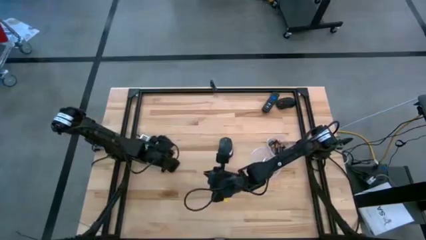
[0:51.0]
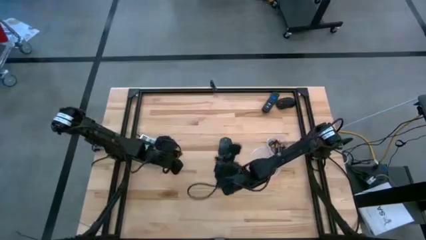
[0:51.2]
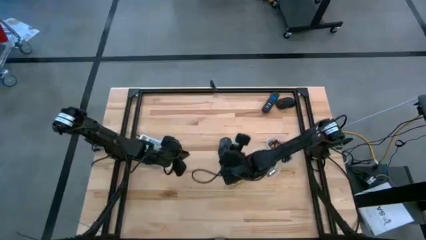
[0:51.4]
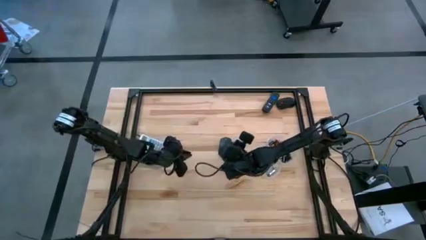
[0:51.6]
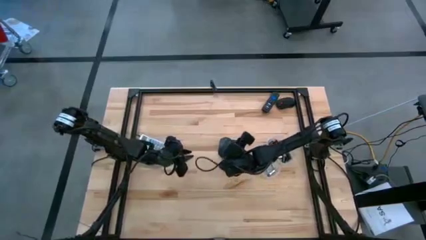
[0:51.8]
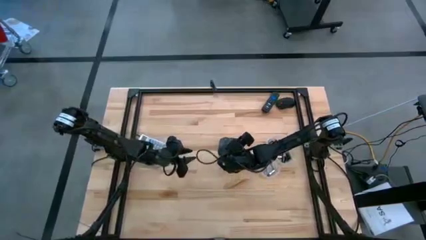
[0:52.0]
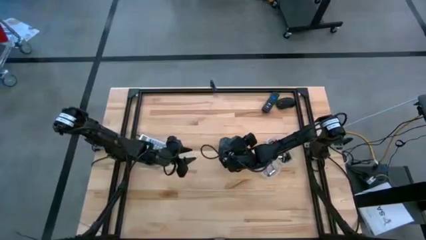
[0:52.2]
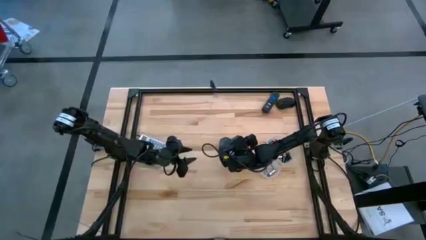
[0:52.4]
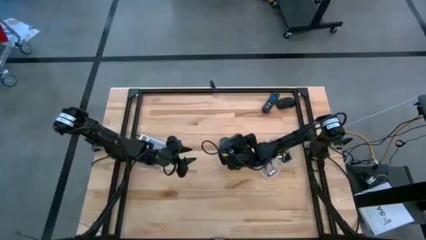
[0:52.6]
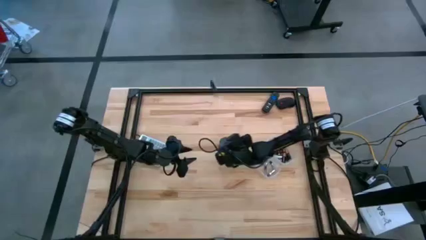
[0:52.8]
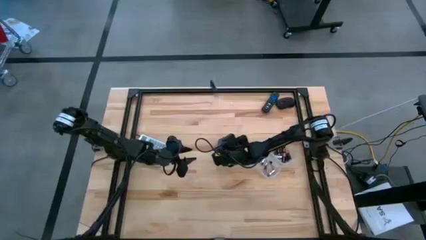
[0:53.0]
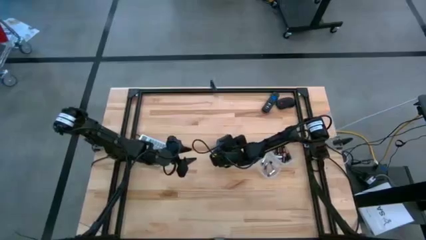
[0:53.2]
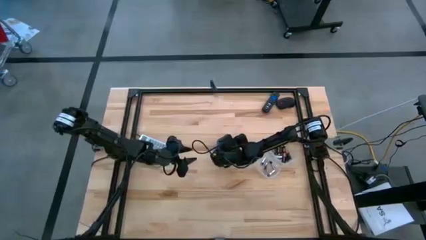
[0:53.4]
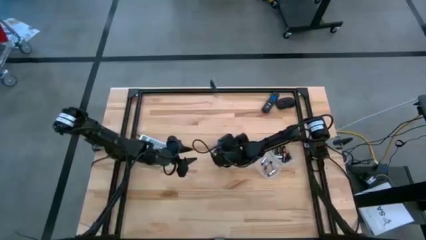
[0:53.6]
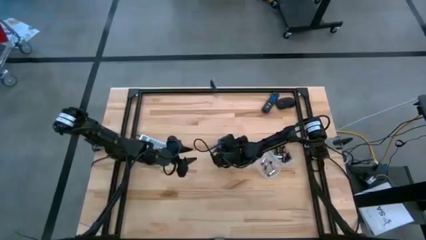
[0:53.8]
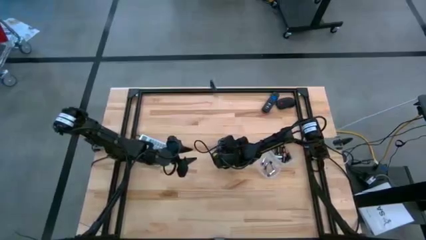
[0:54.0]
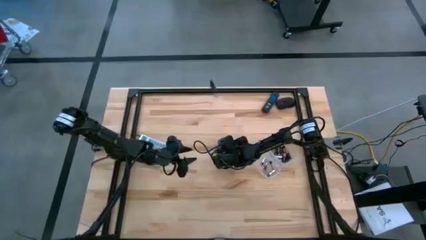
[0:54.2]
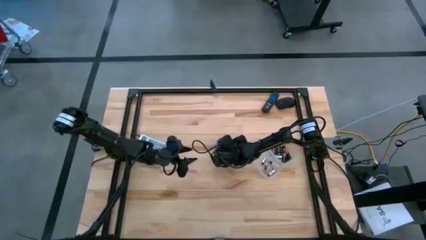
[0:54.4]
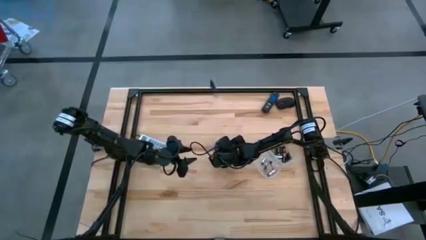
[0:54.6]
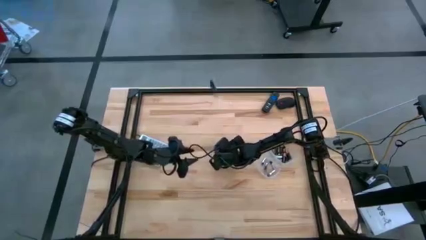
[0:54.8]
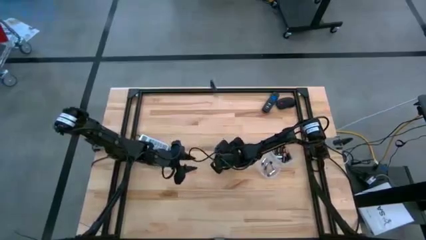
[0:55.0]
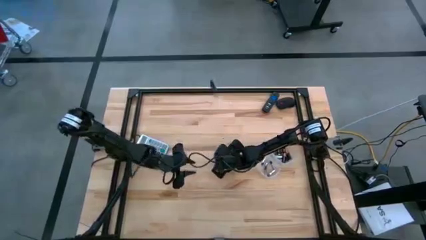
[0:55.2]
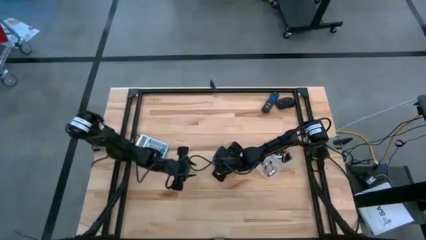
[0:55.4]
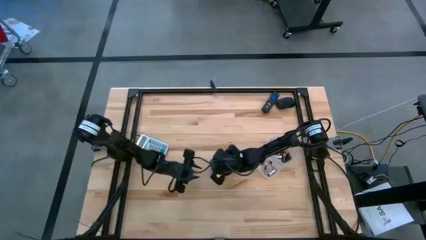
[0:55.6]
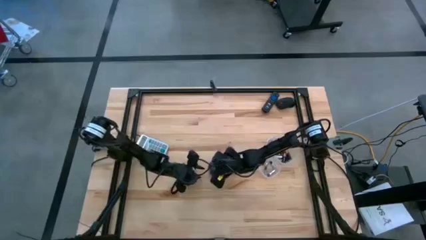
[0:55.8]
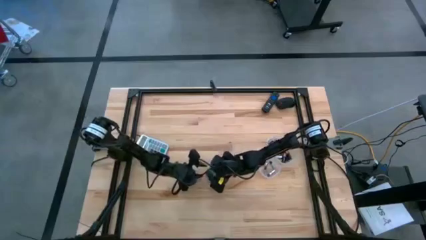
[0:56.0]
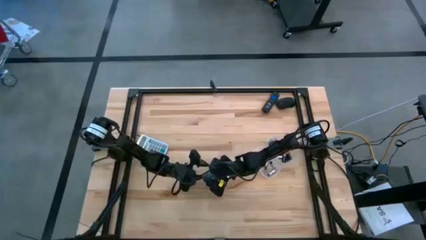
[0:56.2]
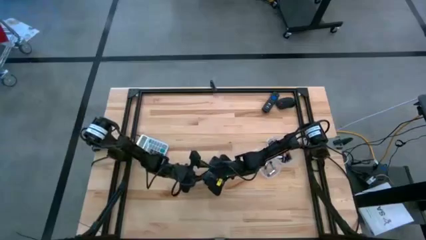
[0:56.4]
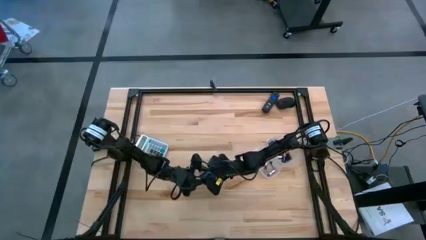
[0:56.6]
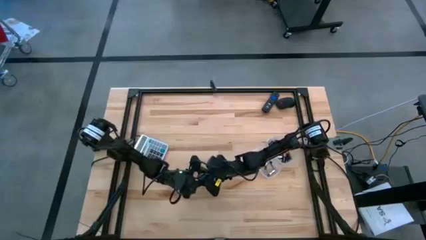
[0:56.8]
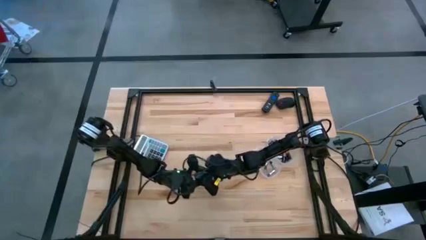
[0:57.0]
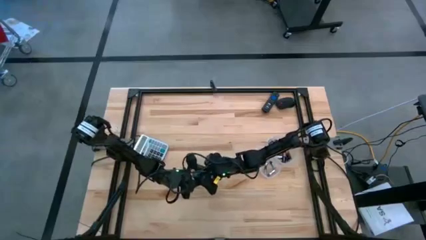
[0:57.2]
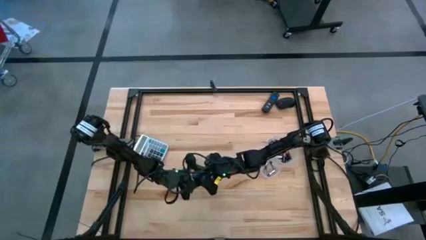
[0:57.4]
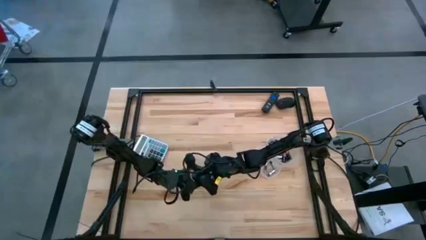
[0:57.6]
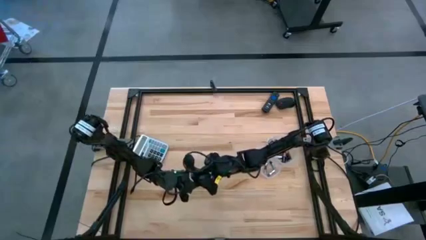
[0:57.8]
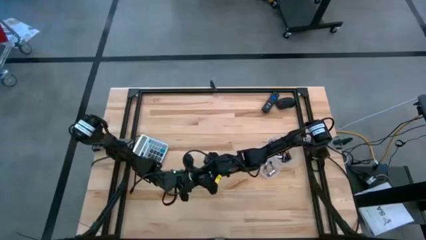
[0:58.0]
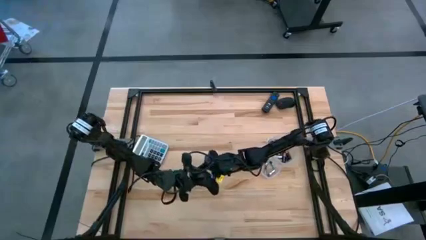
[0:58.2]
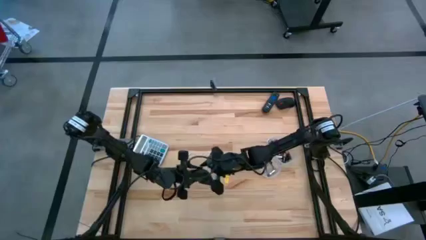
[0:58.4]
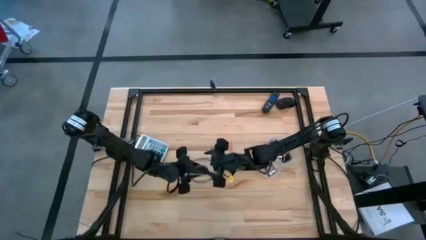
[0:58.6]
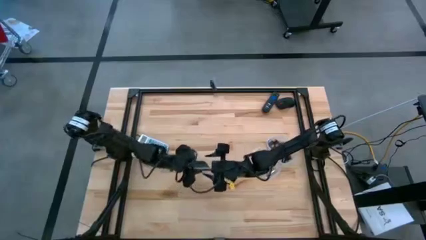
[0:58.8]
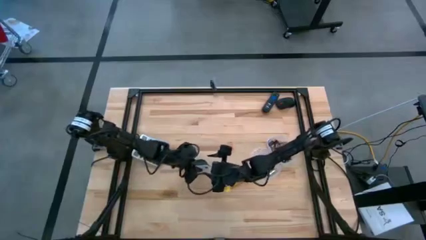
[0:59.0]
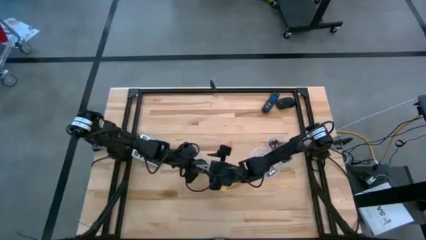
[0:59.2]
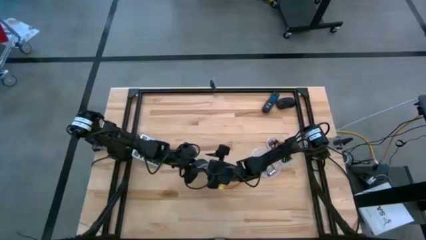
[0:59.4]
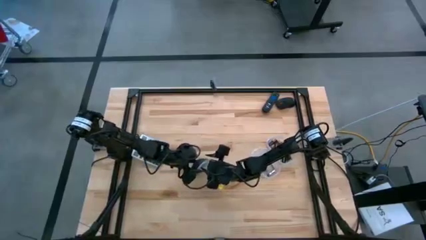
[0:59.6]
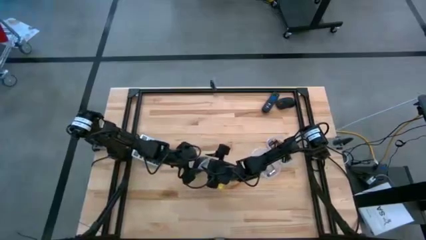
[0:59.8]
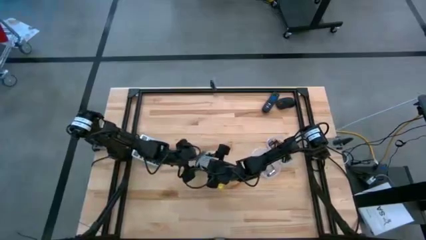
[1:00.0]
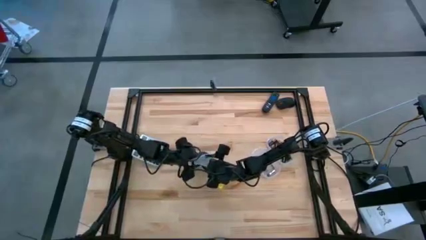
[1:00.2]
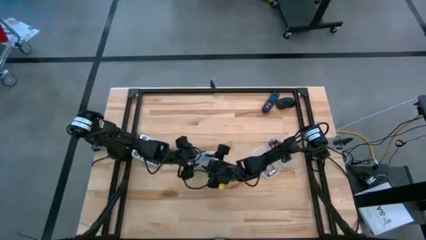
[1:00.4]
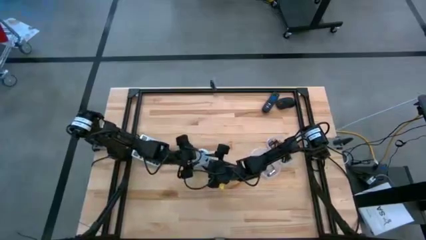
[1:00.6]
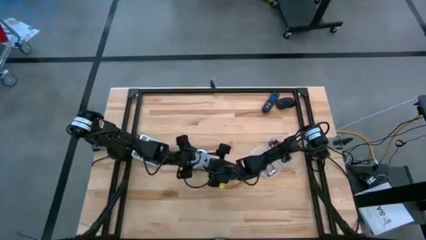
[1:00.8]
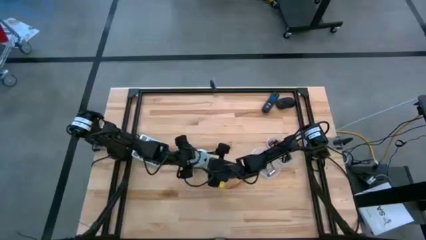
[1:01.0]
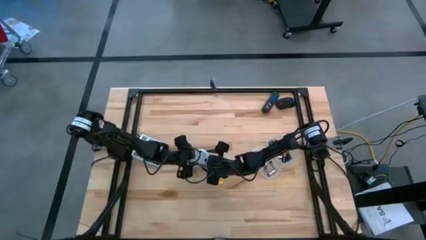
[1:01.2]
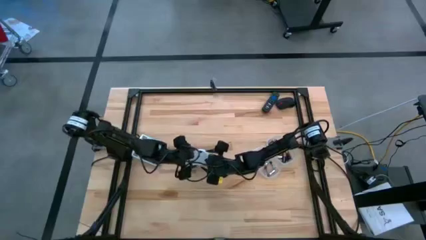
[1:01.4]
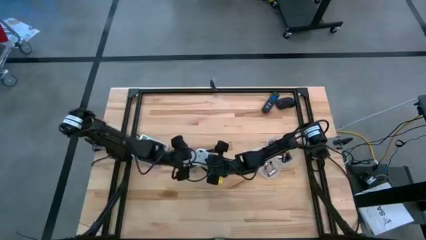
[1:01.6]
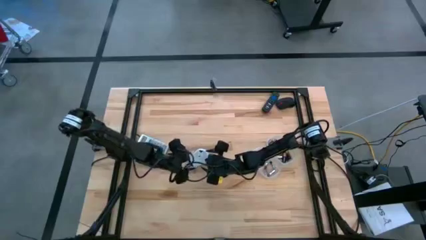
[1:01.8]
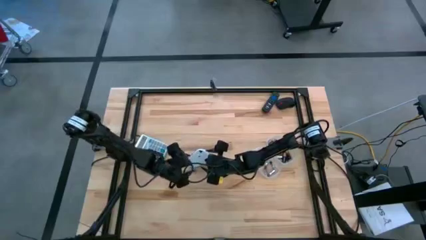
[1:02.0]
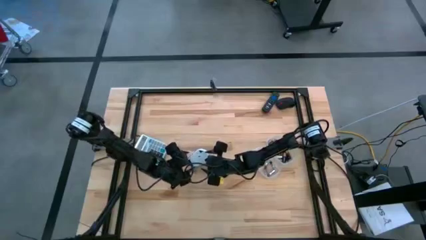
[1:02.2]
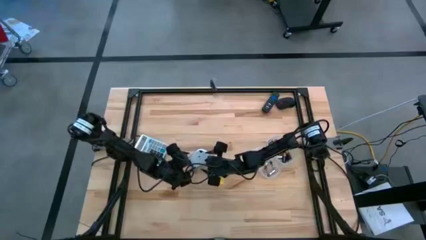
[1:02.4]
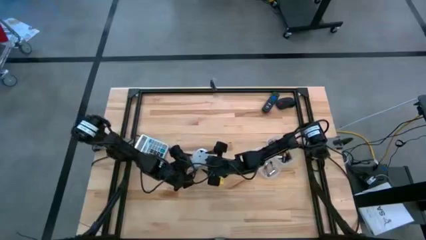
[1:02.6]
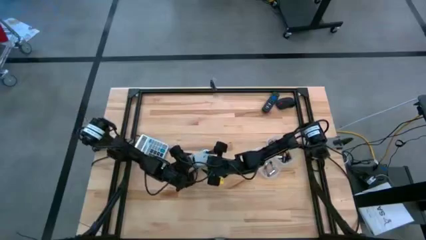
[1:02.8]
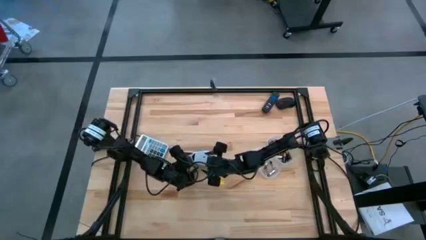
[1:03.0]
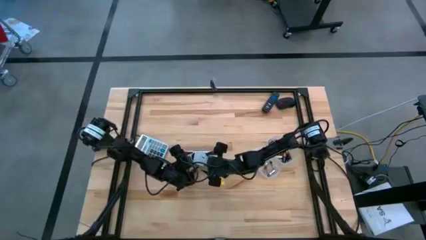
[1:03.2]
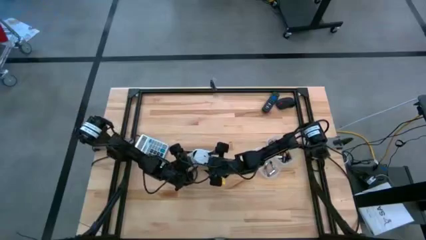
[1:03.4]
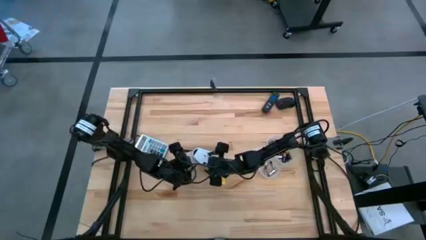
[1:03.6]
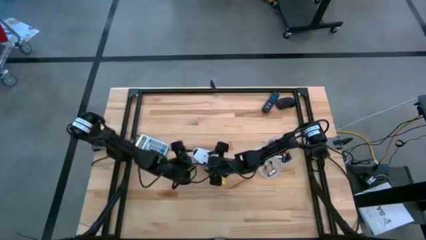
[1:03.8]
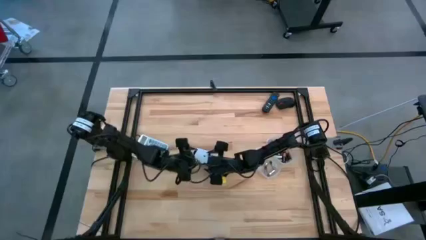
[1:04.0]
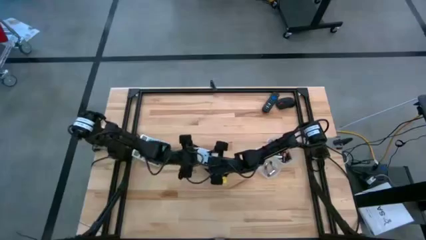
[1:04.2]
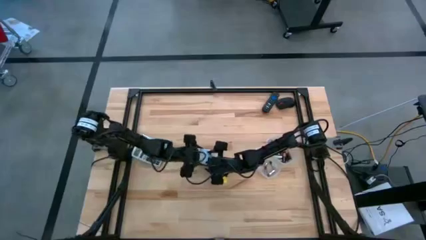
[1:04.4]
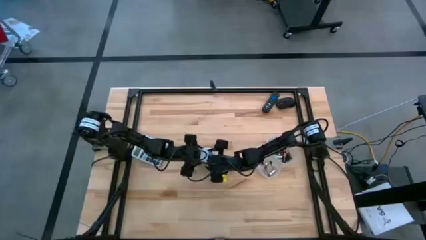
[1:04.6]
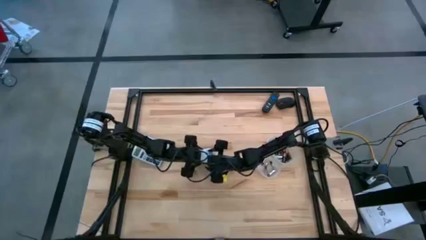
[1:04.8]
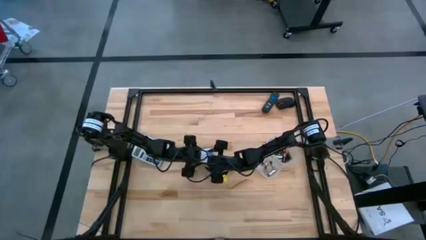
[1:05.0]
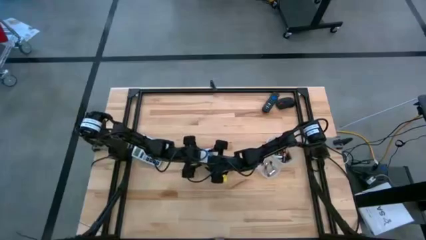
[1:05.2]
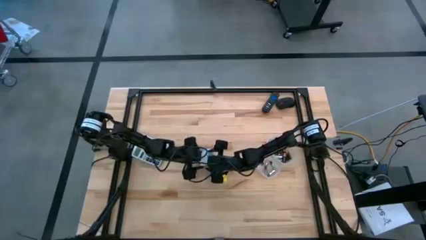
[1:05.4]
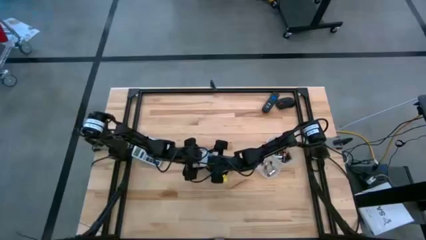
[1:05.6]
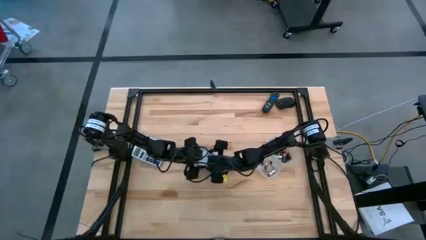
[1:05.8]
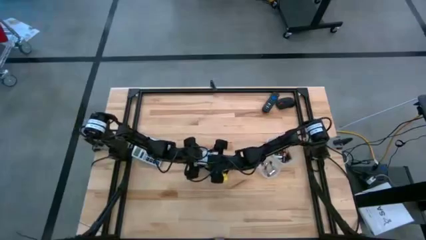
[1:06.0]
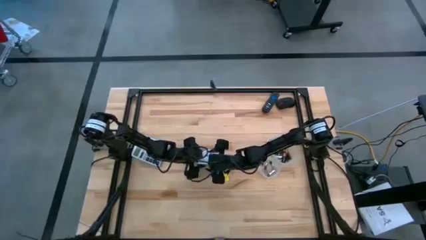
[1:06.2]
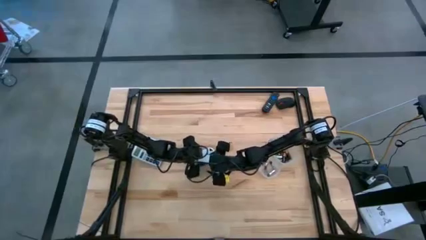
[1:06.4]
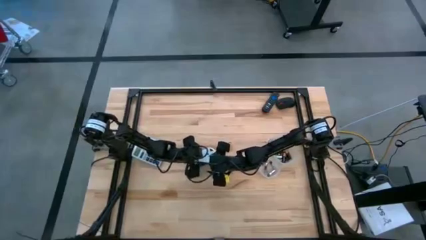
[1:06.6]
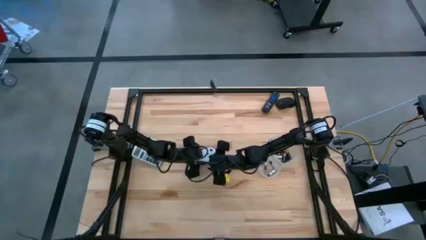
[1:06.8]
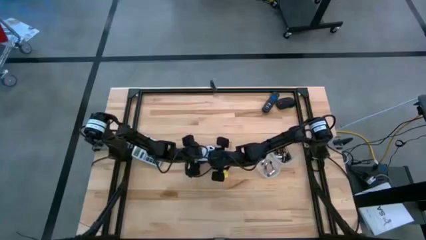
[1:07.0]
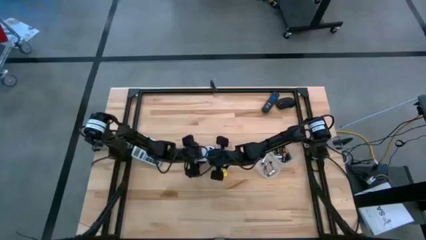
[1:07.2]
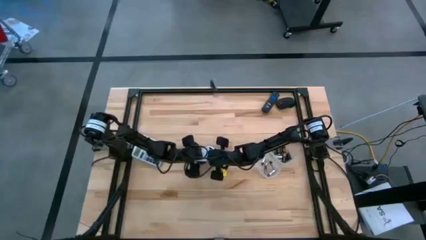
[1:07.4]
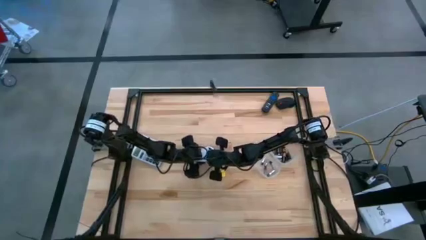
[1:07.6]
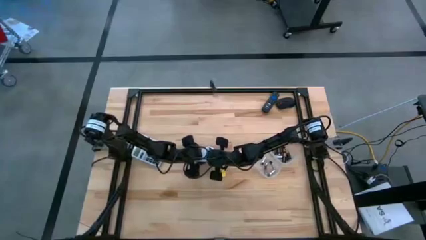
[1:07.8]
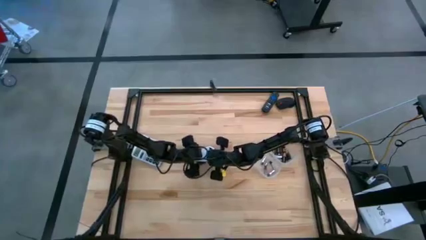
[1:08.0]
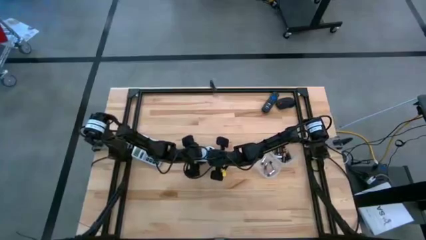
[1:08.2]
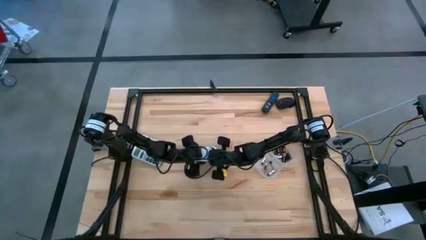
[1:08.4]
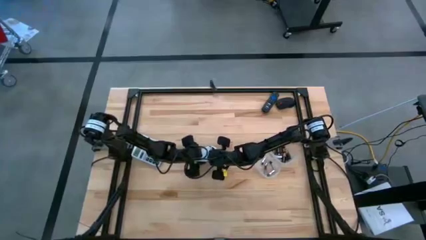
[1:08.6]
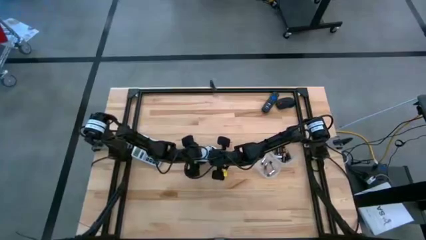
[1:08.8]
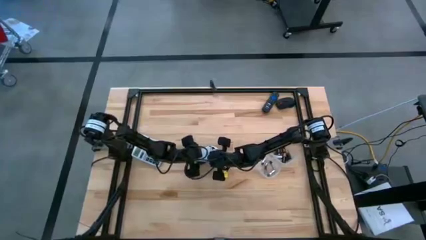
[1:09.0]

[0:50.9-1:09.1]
Task: Insert battery
Open the black/white mouse battery compartment
